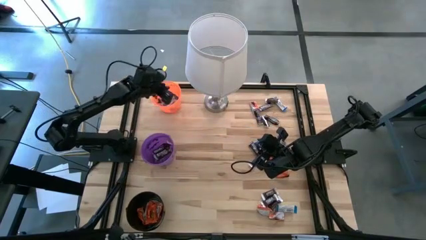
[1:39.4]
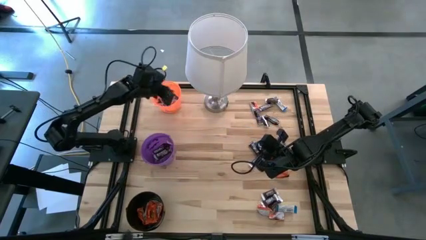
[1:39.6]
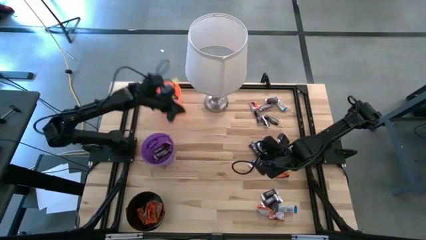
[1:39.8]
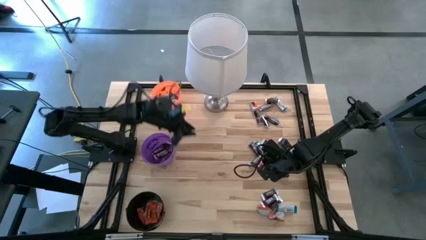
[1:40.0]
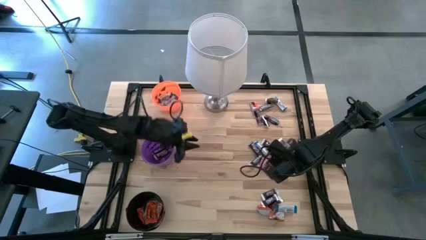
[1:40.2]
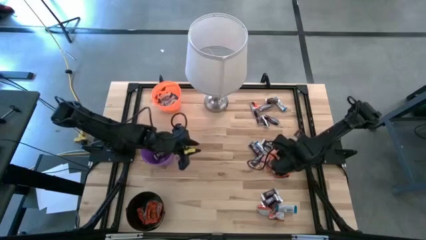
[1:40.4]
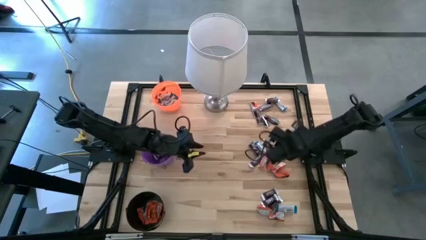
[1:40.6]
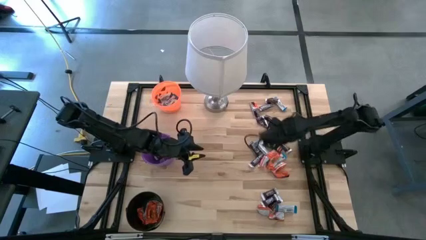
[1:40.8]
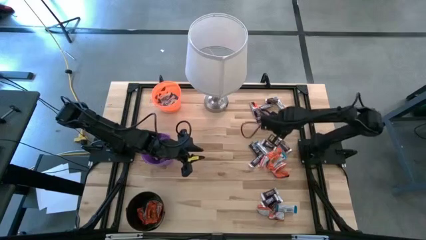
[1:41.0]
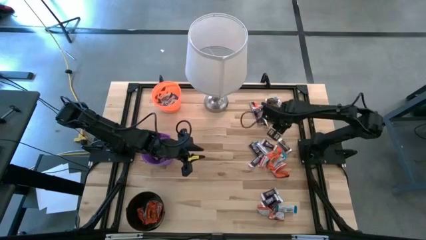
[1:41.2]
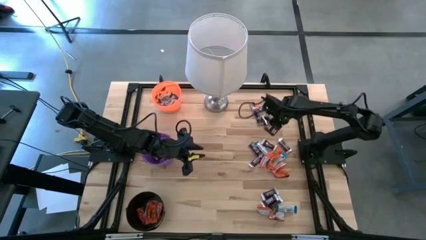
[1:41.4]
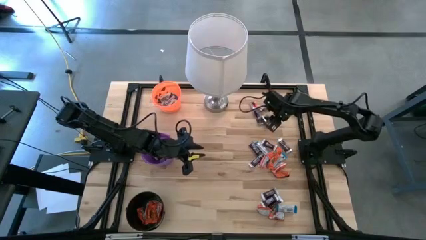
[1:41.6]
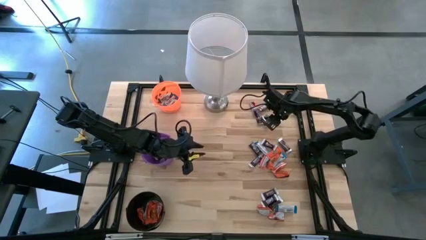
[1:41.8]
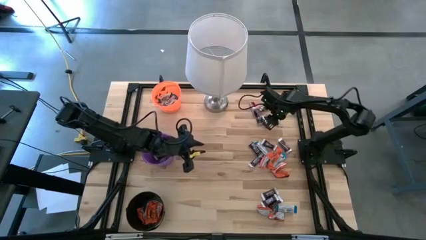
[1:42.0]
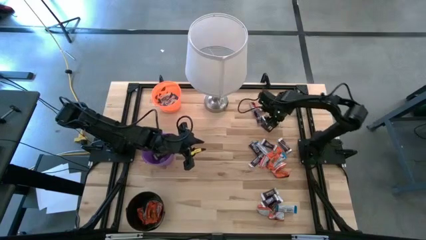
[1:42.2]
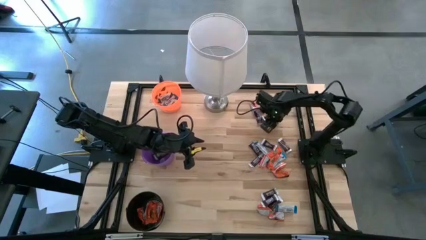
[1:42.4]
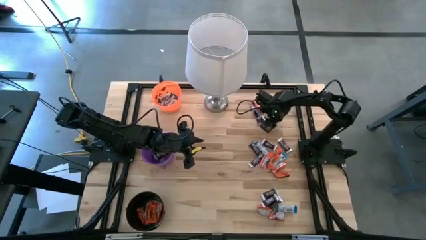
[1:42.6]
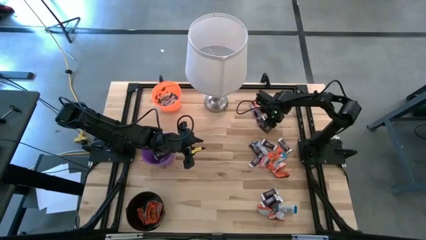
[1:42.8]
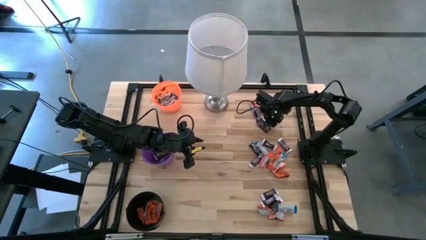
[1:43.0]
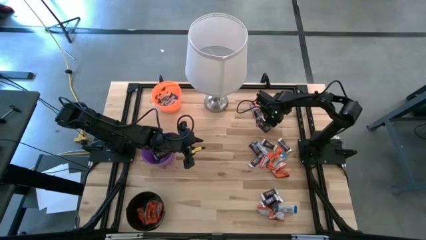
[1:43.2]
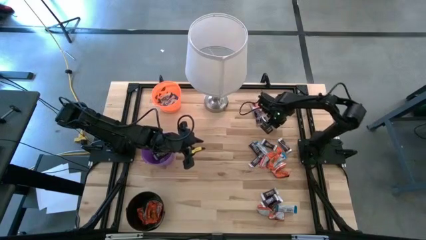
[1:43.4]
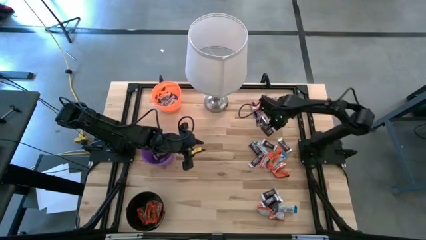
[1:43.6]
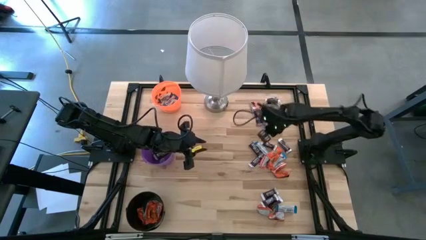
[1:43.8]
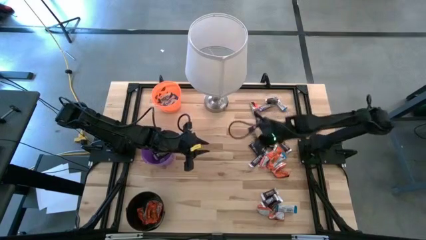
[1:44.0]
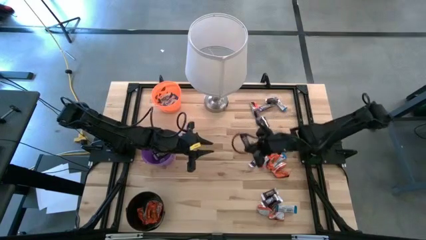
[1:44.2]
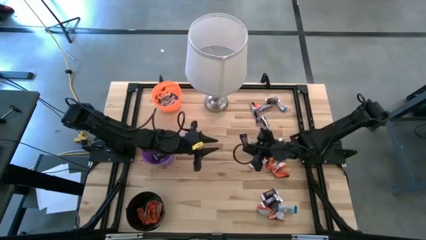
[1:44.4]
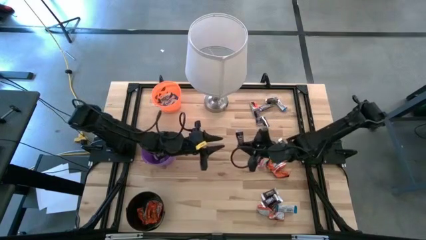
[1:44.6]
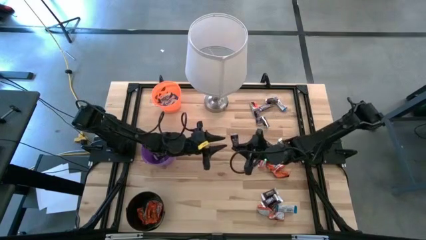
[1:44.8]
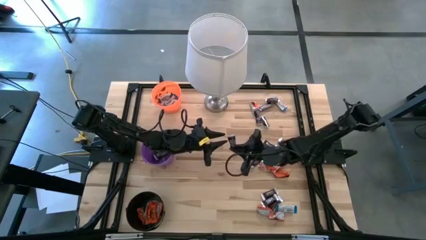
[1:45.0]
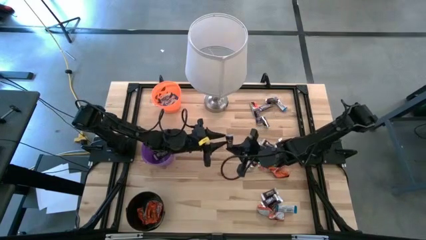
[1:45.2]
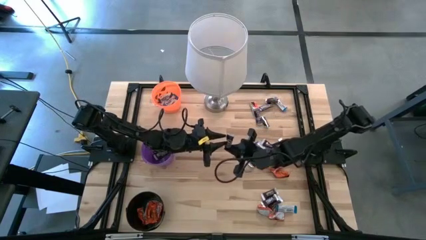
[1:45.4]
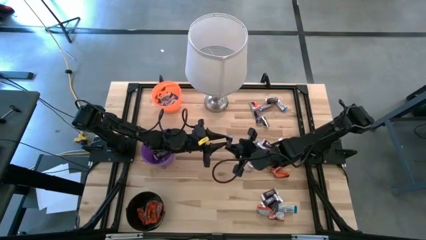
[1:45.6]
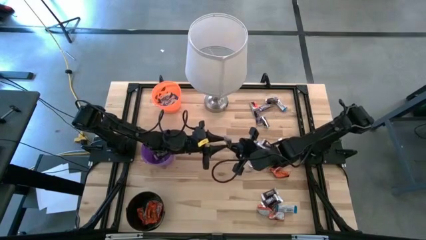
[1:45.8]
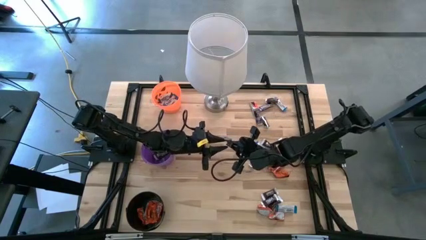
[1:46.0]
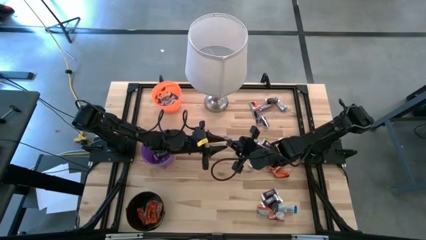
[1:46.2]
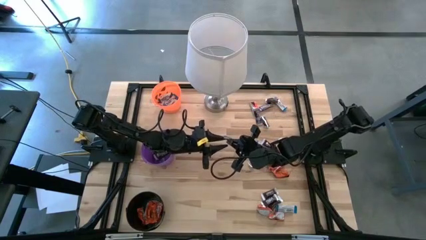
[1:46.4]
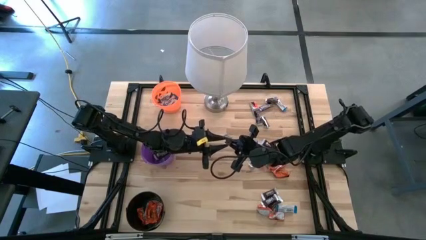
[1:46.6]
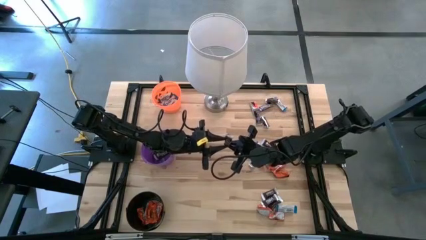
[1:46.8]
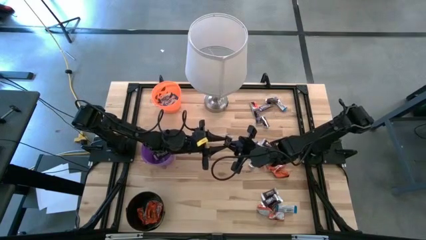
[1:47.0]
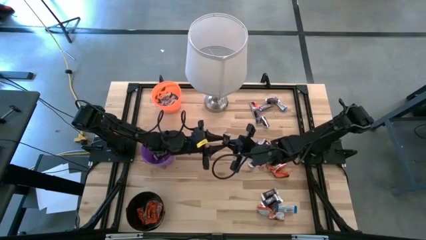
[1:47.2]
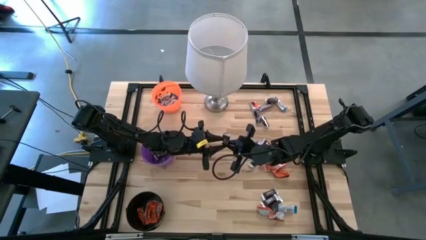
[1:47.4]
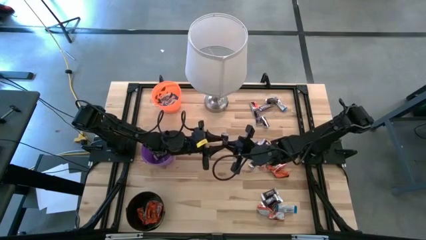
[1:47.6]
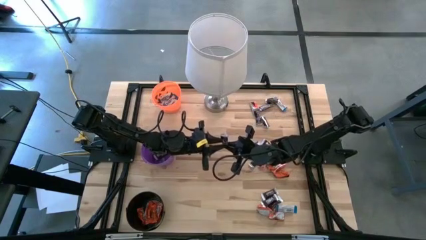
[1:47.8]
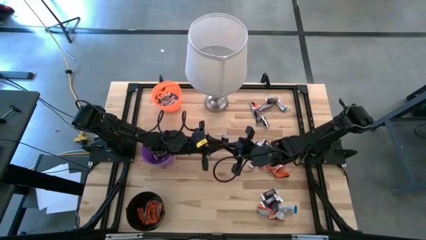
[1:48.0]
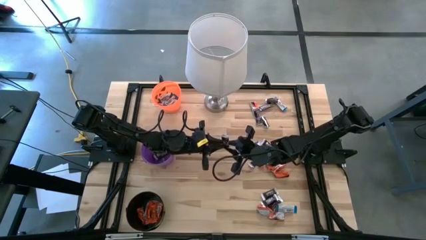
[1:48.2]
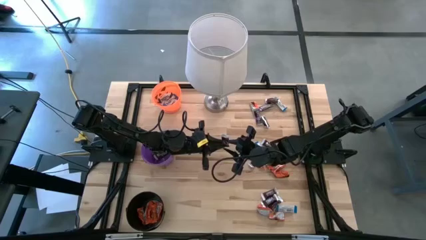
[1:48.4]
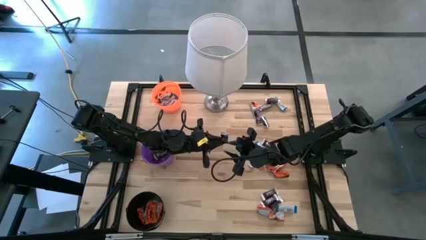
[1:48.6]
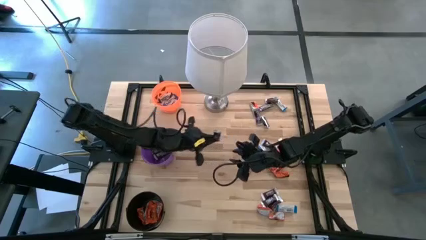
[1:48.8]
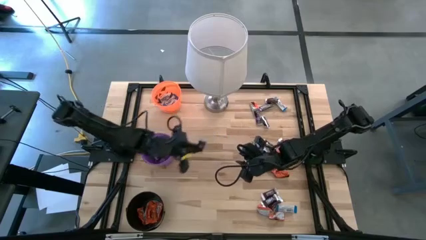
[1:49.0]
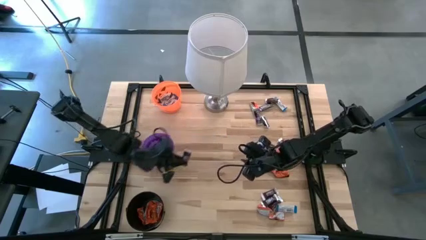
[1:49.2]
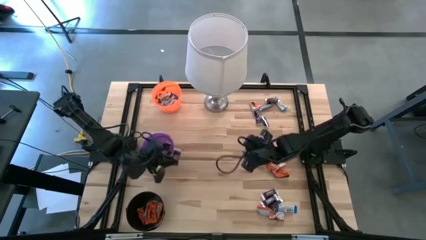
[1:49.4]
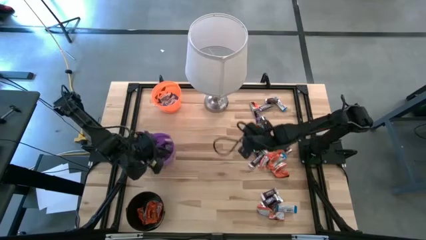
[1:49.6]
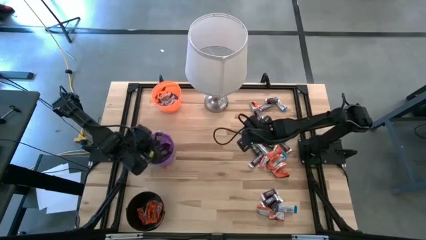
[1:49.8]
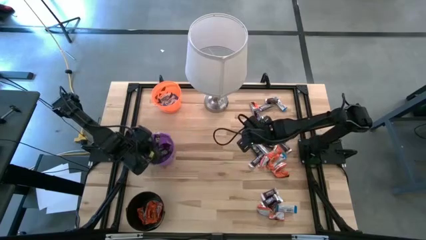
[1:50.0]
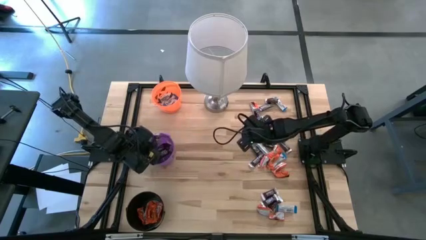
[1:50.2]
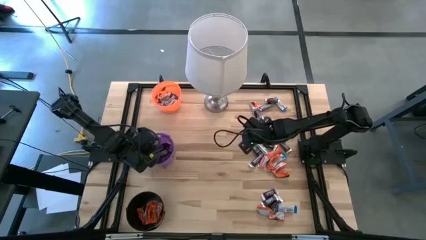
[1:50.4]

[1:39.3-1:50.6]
Task: Sort candy
Put the brown chocolate into the purple bucket

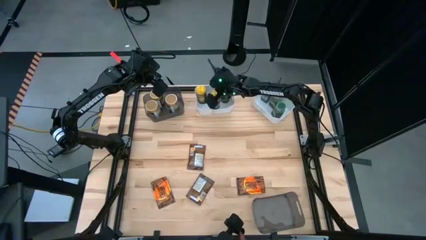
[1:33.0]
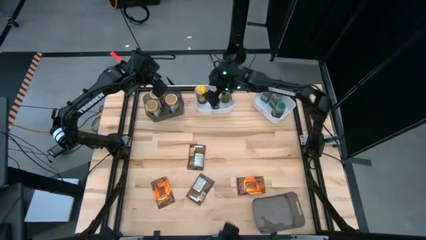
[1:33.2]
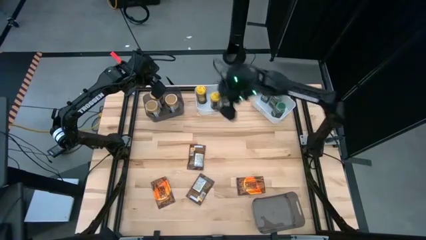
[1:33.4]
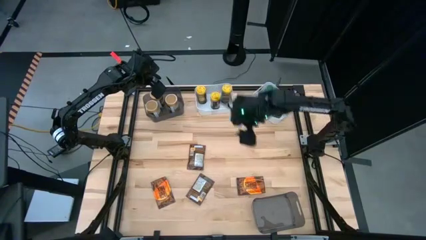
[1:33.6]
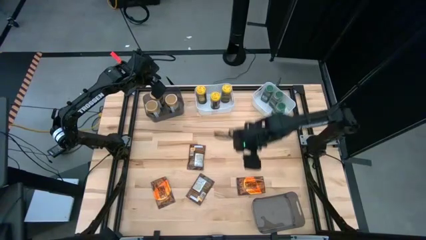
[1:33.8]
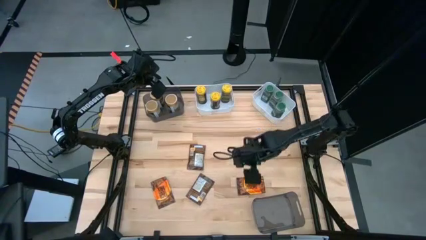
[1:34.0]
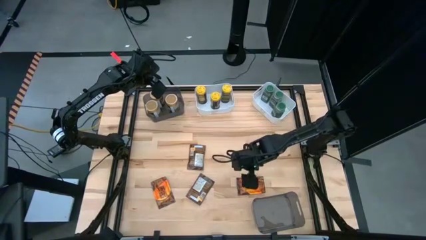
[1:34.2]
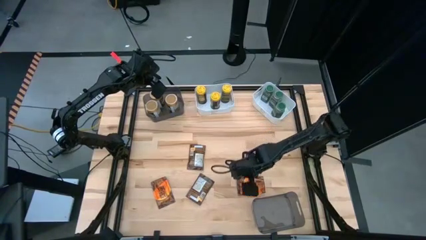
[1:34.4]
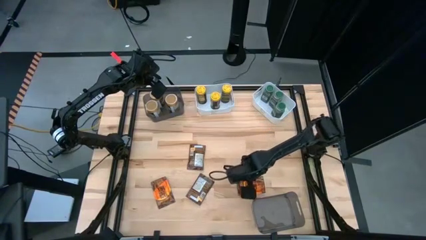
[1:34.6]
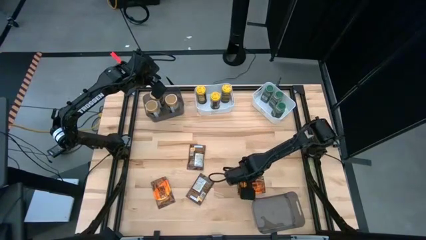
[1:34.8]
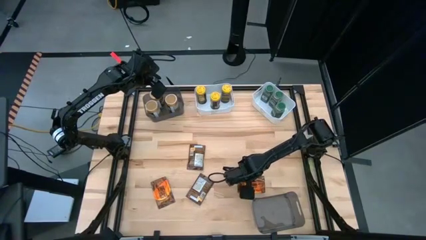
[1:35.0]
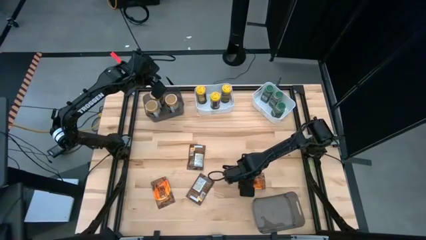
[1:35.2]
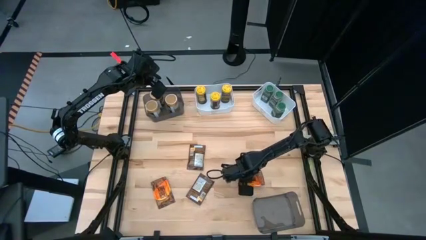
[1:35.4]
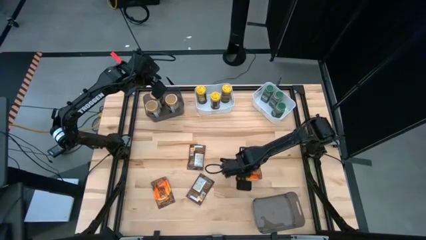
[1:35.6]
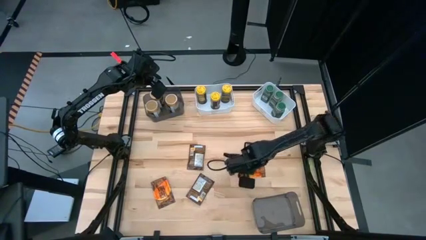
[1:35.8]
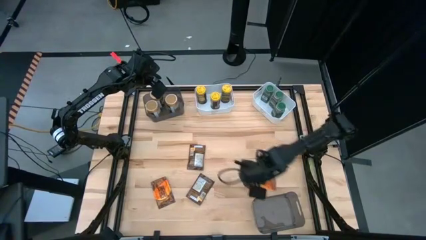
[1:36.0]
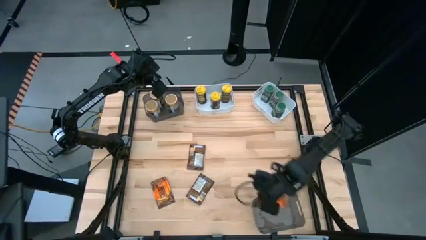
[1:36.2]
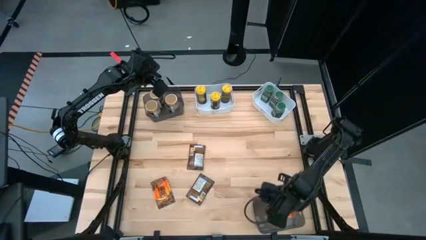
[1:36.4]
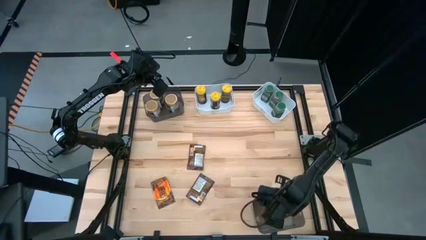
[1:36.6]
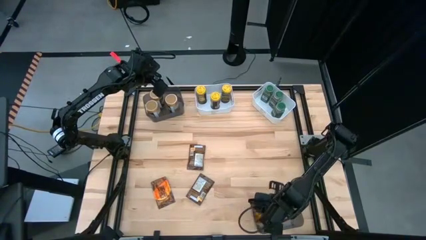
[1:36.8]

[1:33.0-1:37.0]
Task: Sort spices by type
Put the orange seasoning pack into the bottom black bin

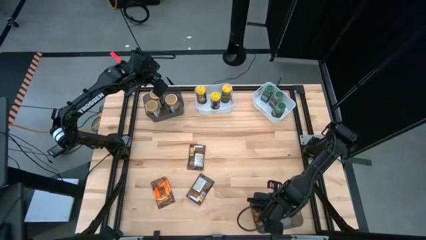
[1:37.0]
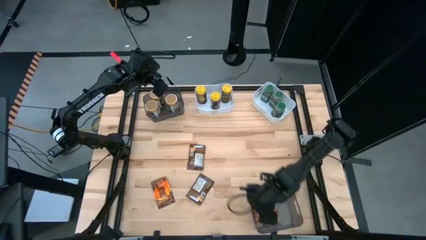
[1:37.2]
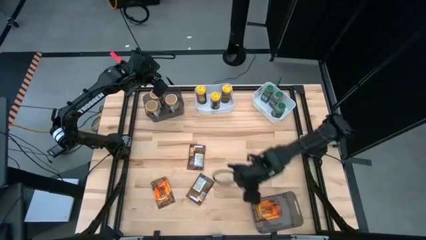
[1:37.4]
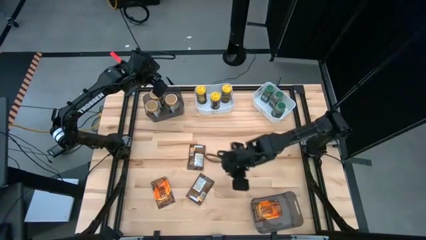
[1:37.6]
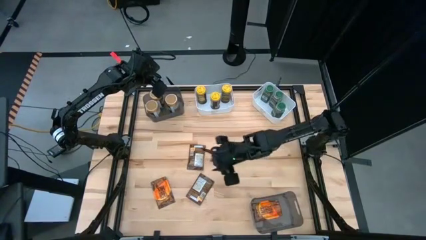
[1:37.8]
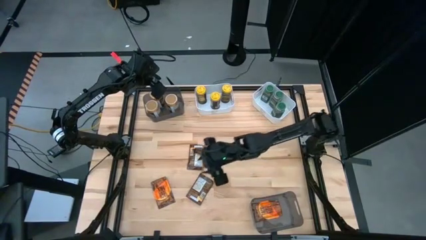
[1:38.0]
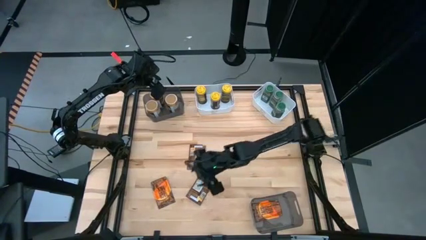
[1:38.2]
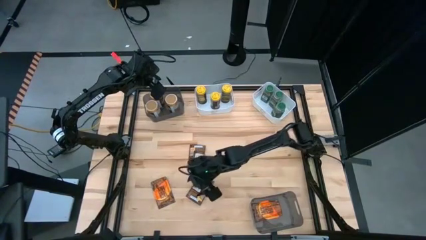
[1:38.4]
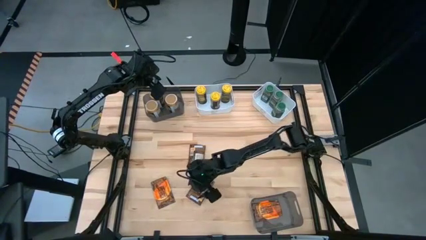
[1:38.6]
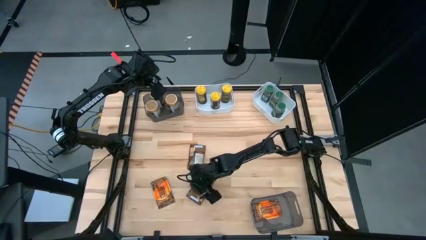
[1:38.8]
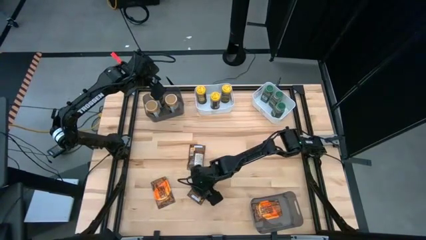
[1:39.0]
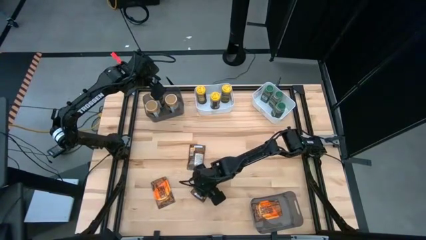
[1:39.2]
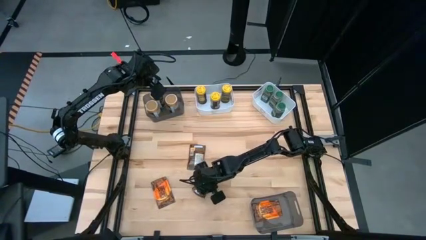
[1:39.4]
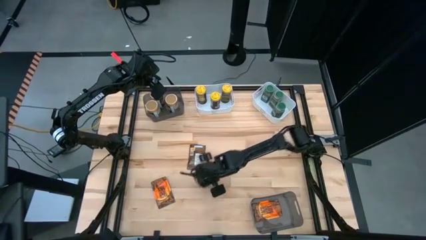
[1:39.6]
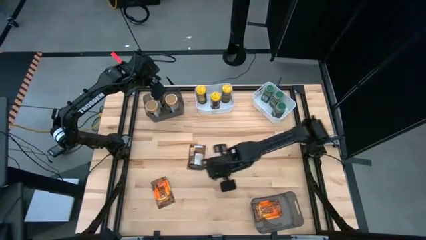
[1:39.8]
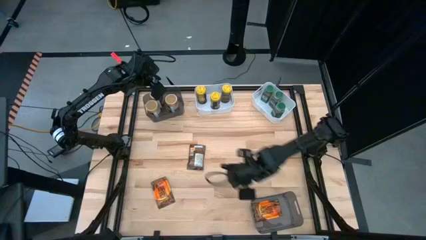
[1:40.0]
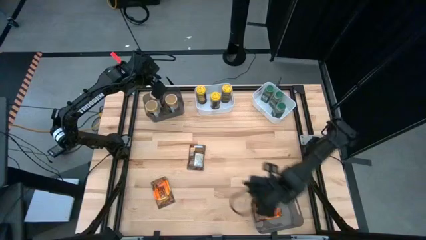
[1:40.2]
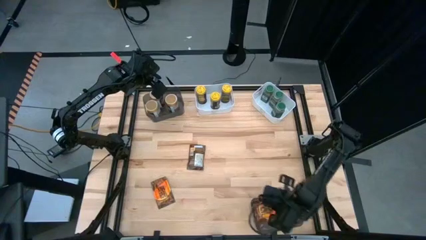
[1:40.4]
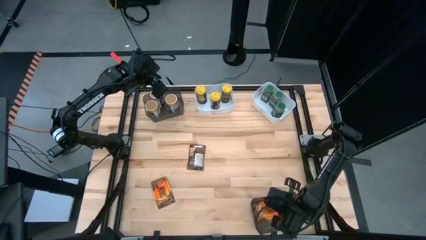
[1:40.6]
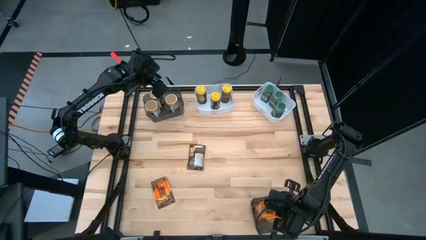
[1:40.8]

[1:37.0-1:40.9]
Put the orange seasoning pack into the bottom black bin
